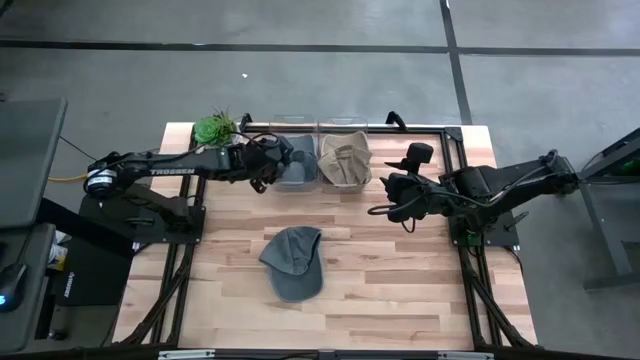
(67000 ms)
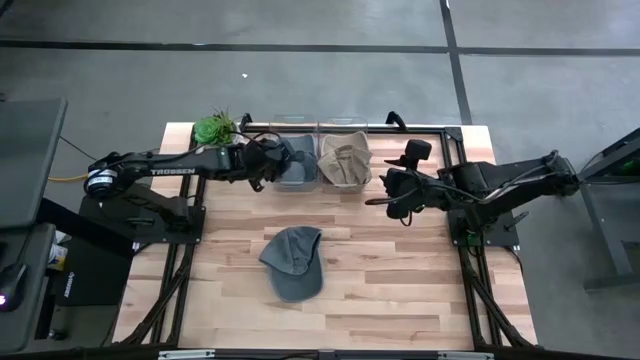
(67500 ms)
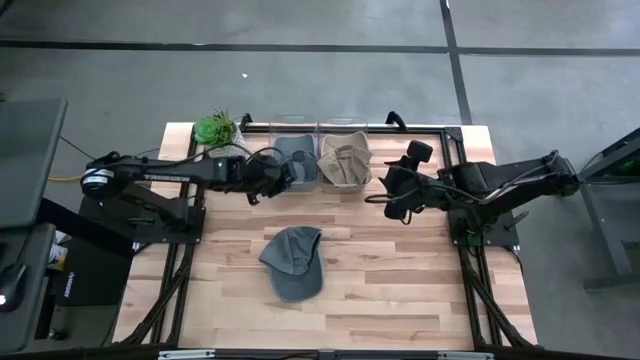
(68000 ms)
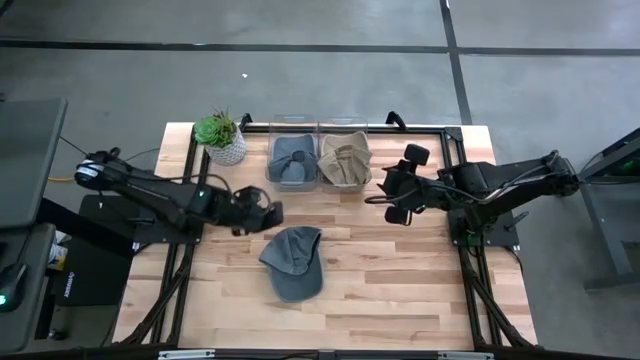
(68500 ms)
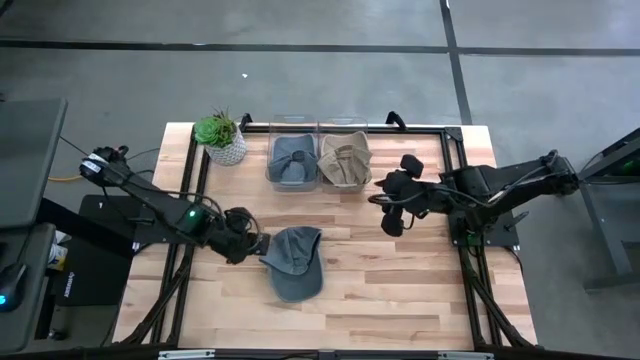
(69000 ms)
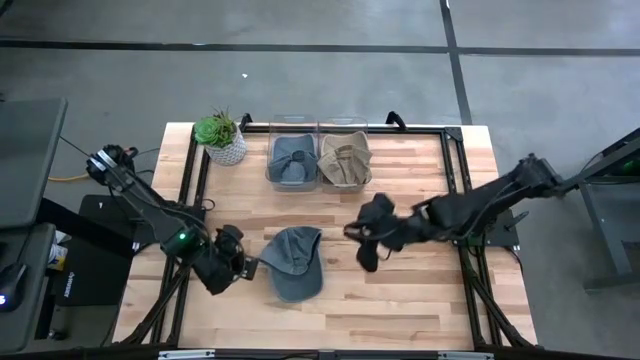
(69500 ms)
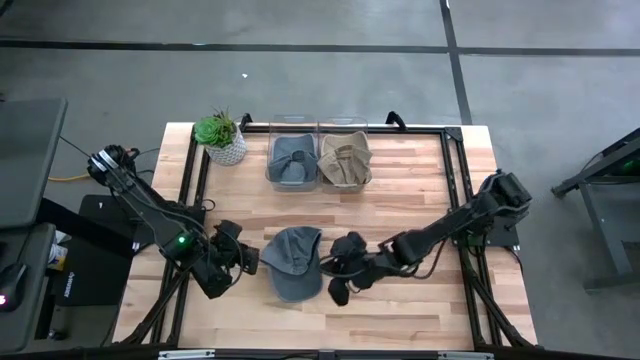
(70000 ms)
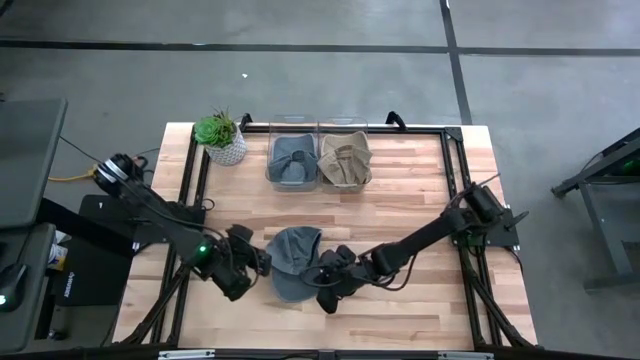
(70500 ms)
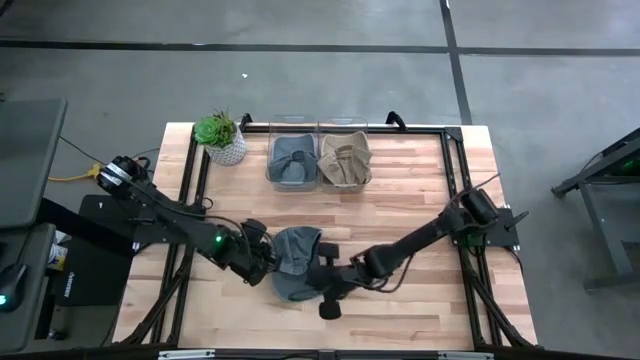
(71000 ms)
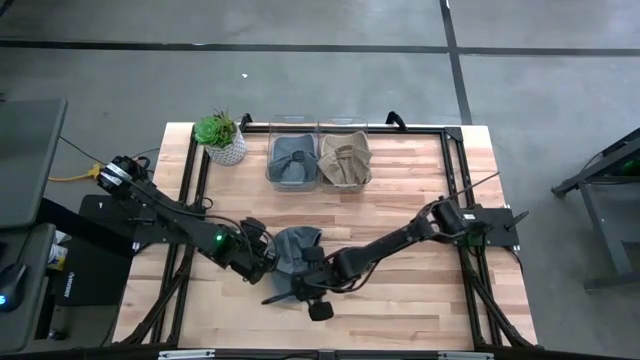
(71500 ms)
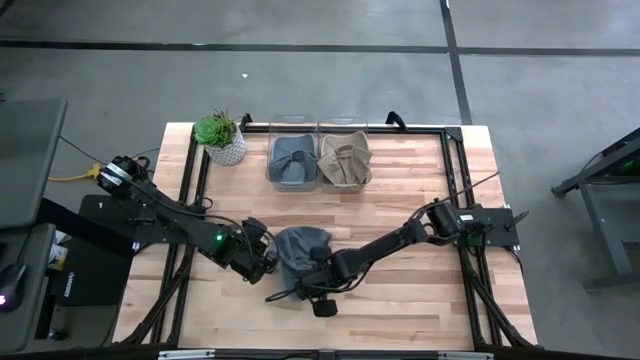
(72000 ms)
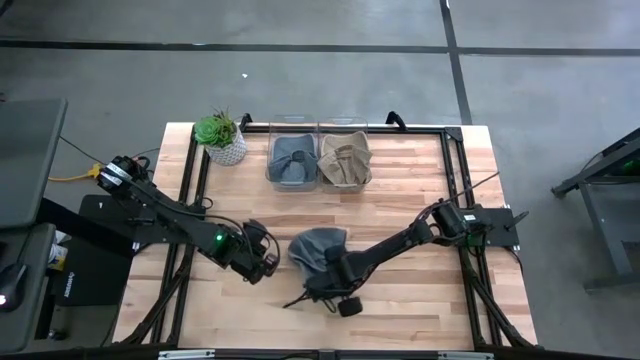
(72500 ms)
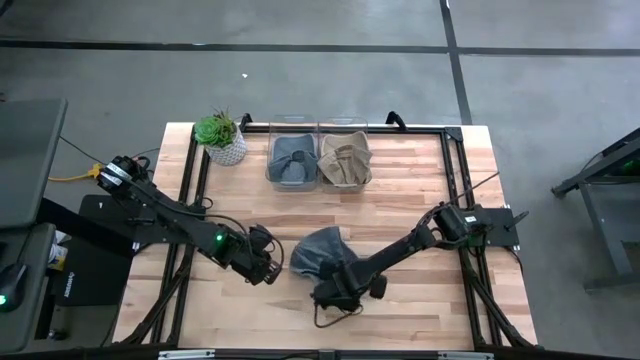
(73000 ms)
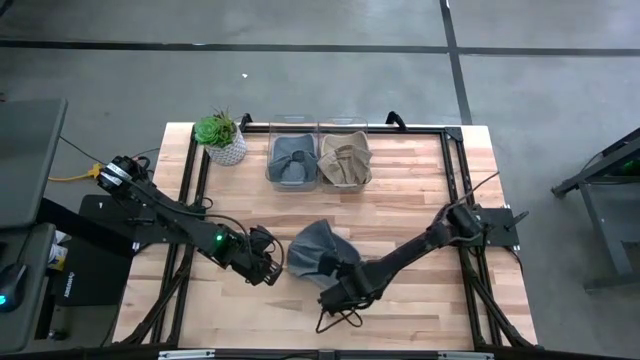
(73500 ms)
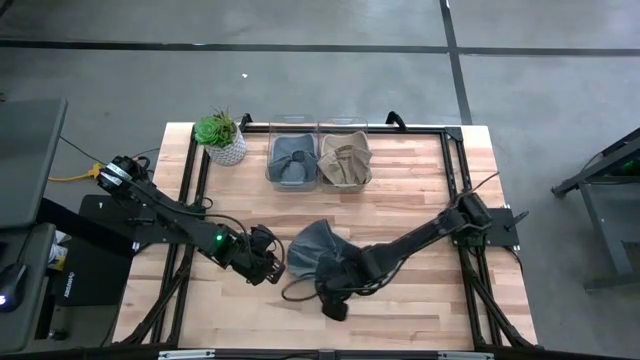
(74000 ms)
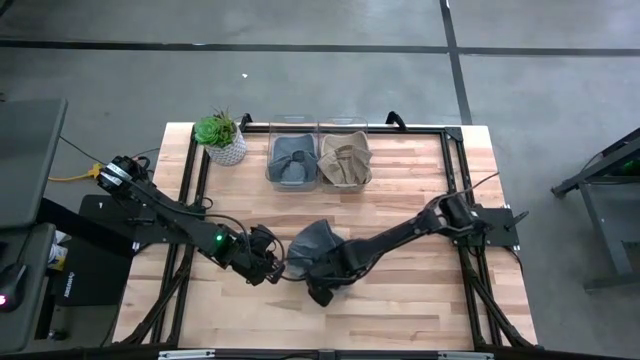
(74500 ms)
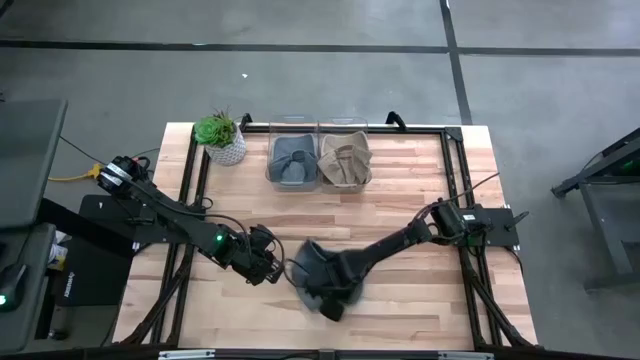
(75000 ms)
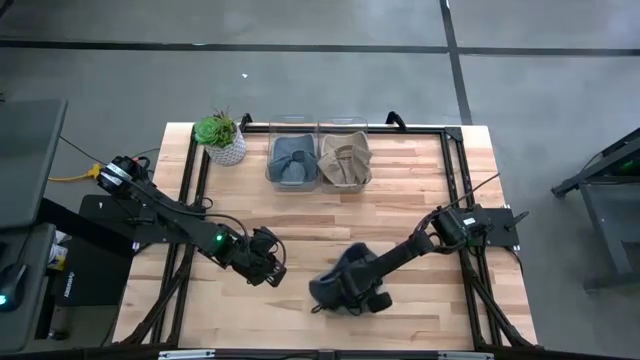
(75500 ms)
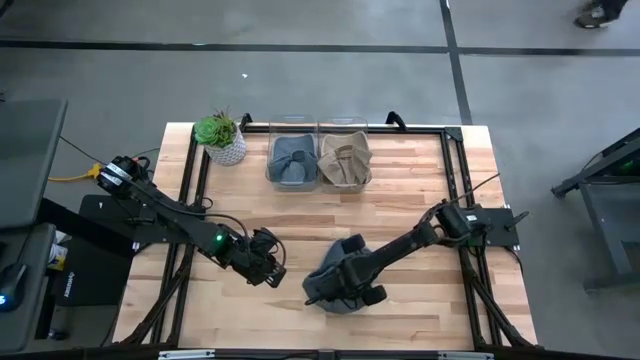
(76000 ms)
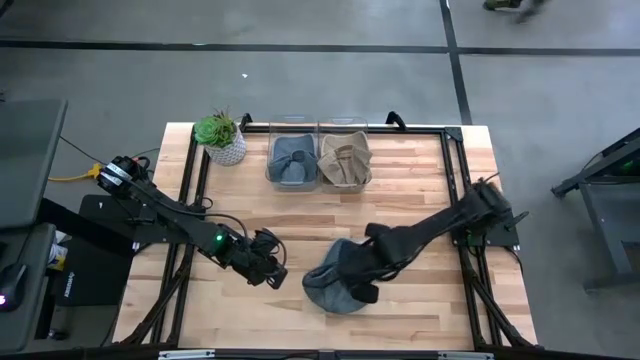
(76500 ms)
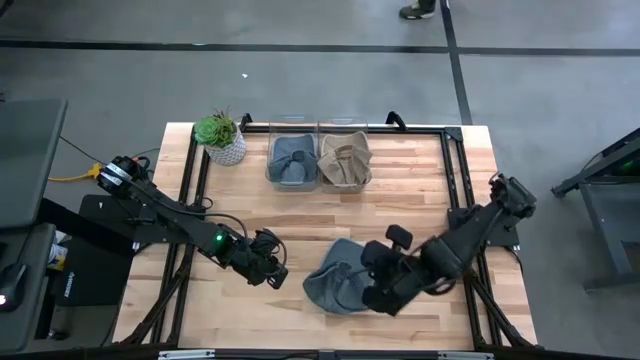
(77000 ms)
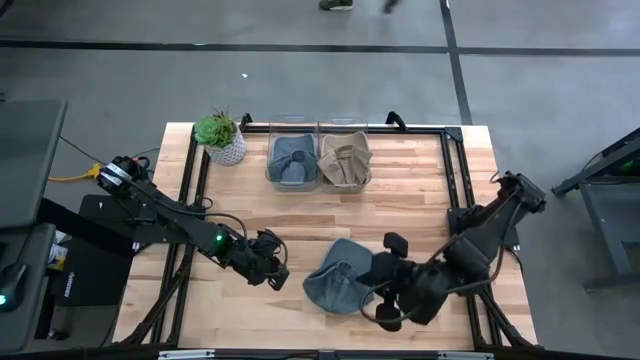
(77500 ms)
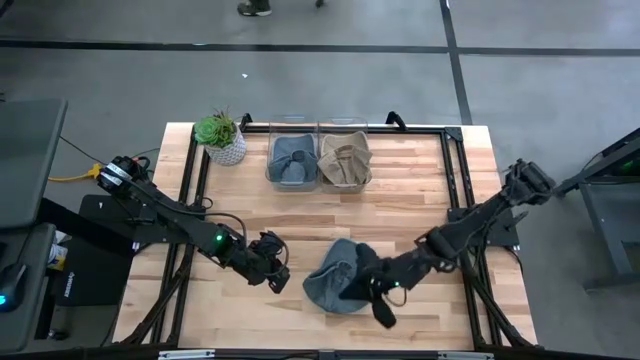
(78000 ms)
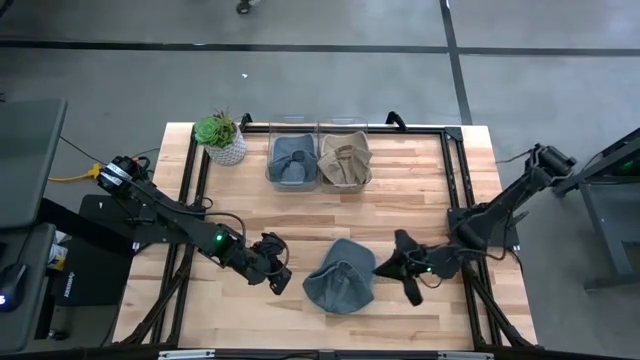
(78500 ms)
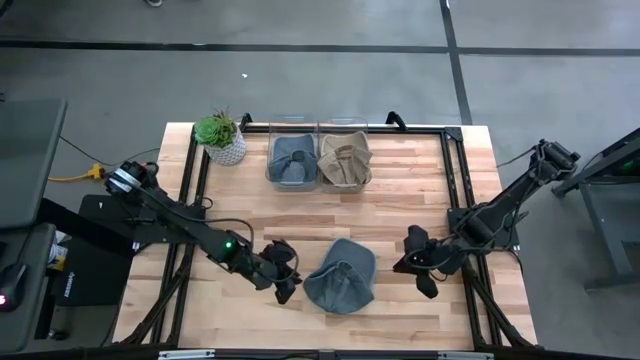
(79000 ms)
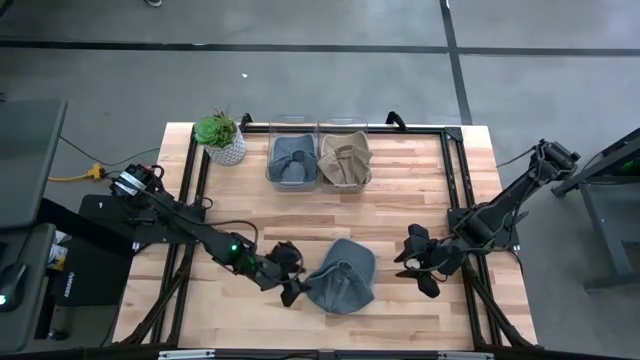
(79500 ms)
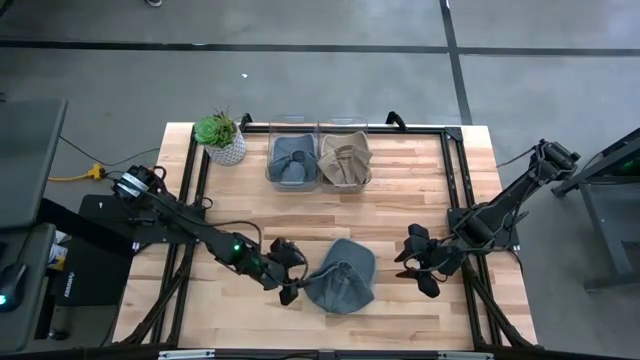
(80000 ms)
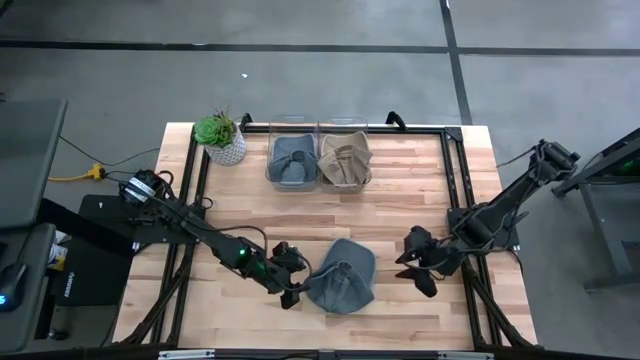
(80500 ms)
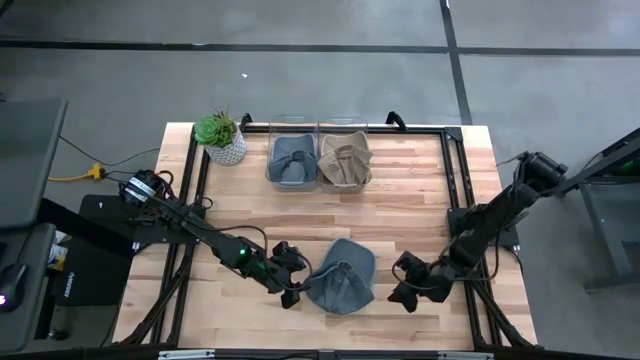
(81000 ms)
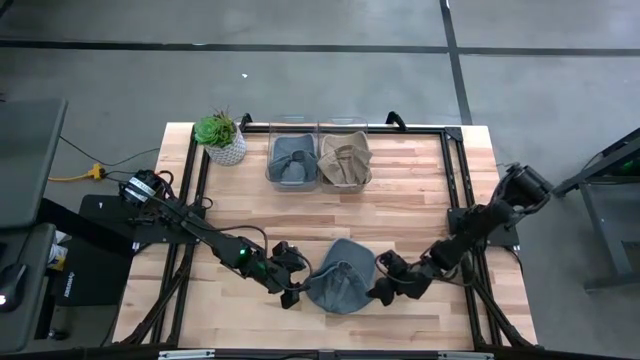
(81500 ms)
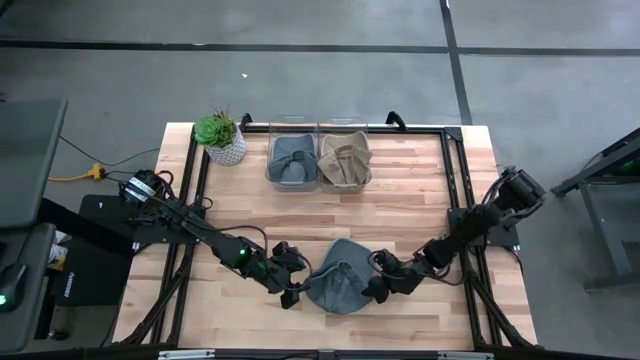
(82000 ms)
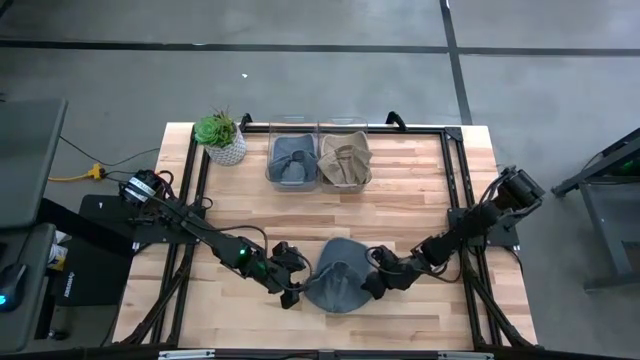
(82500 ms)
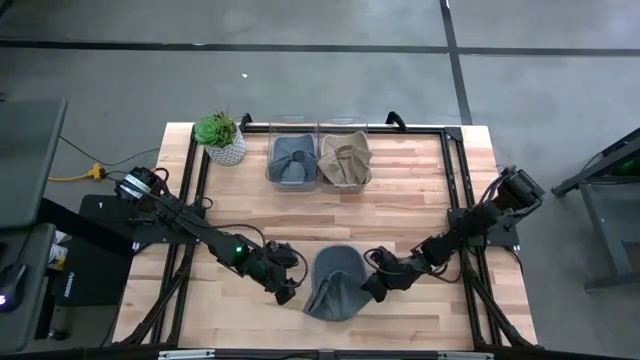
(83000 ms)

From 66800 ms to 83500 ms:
Task: Pick & Place hat
Put the gray cap into the left transparent bin
